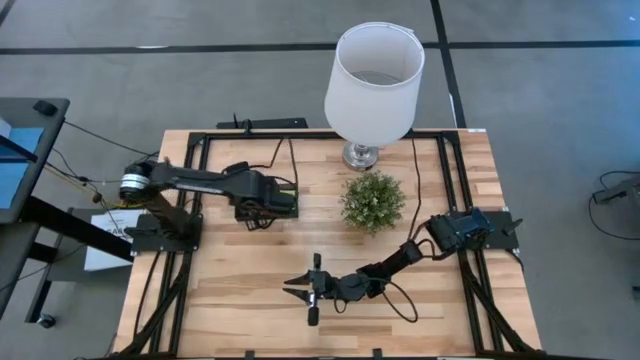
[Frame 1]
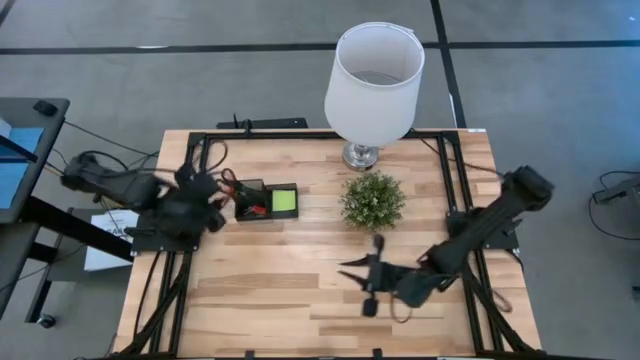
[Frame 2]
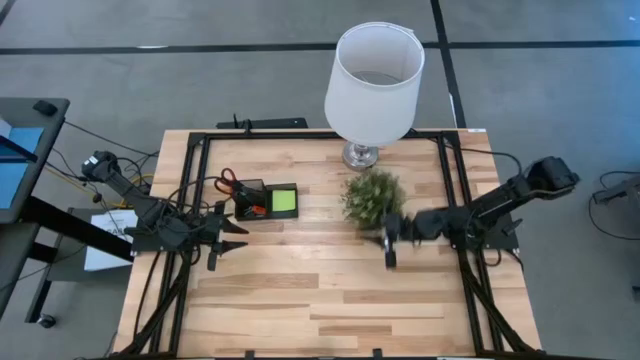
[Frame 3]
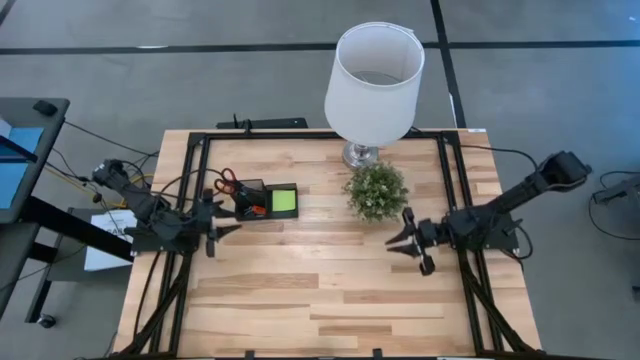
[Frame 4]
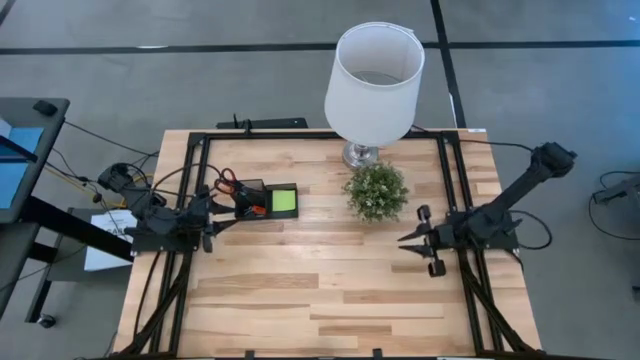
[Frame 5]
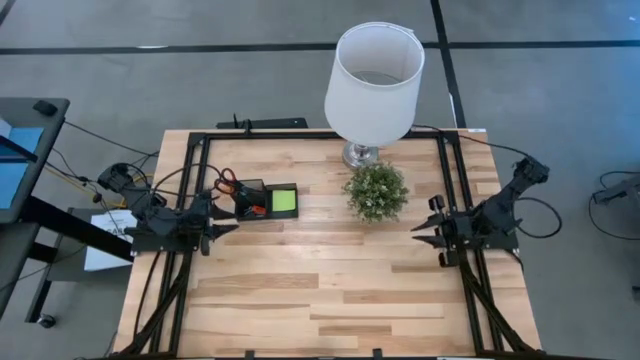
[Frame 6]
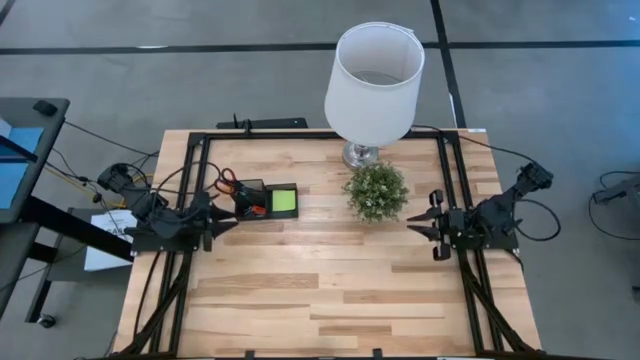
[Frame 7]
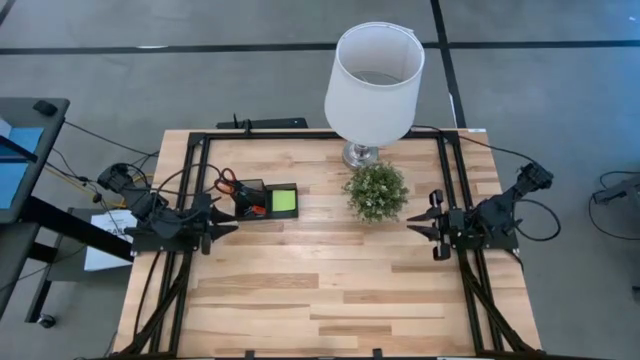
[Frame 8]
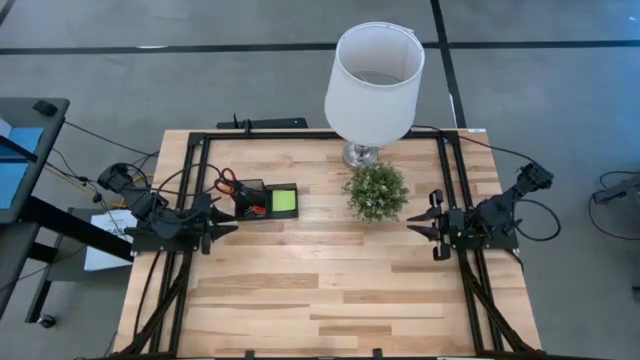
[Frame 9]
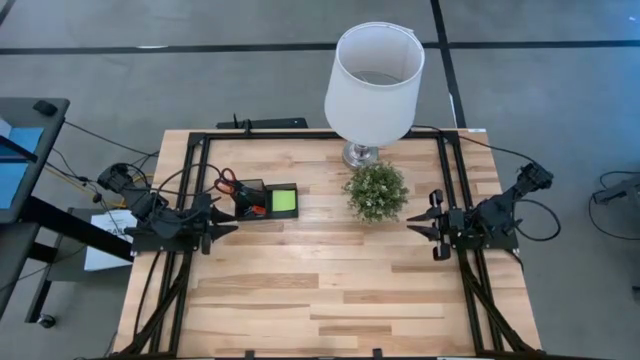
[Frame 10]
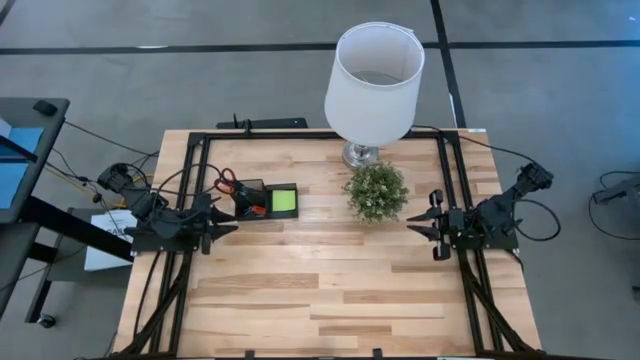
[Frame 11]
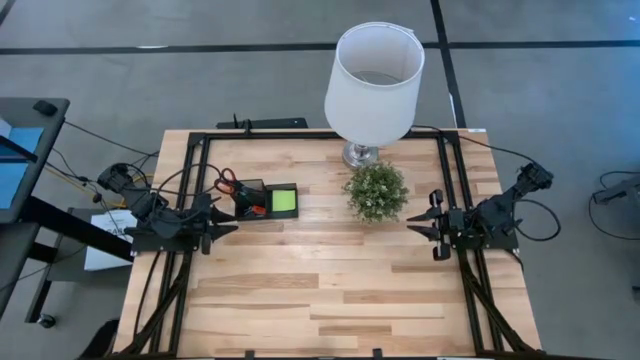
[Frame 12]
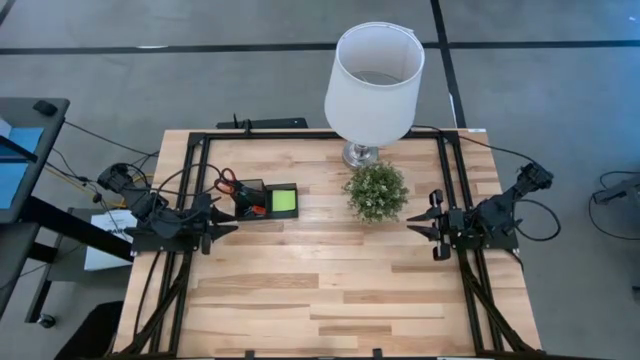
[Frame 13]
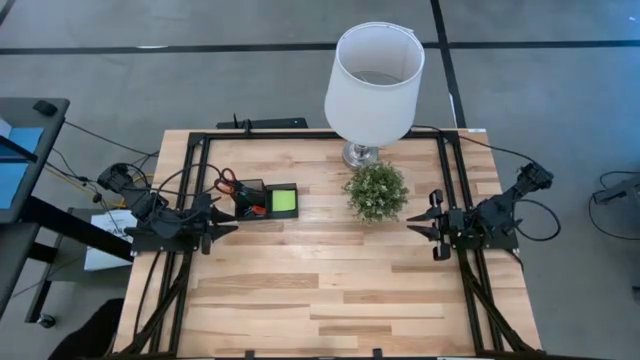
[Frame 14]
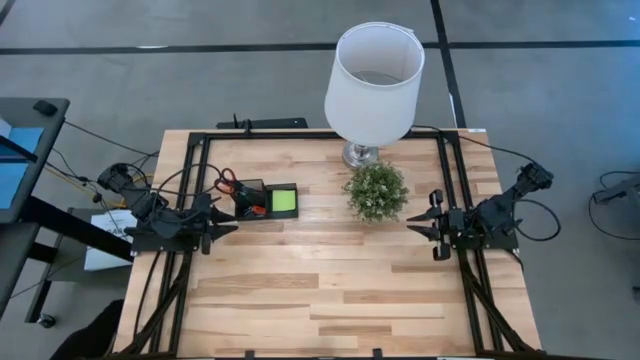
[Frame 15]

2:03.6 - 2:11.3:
Task: Pick and place office supplies into organizer
Return to Home Position

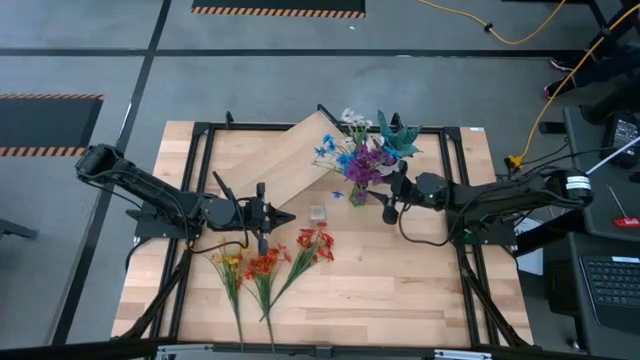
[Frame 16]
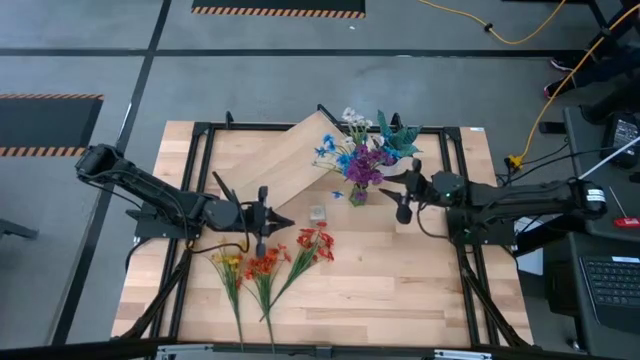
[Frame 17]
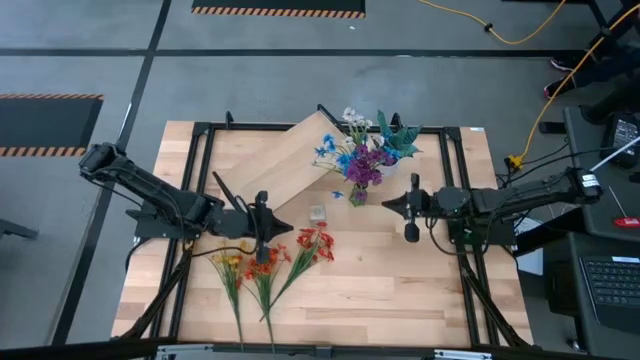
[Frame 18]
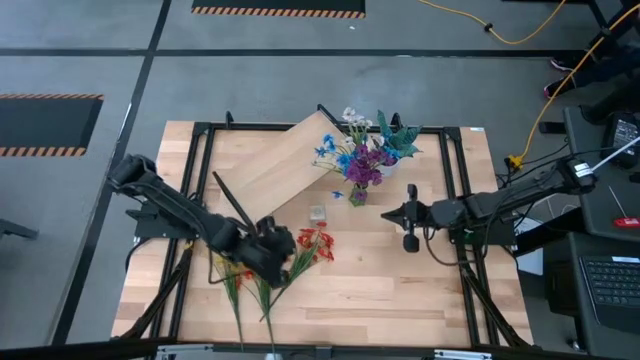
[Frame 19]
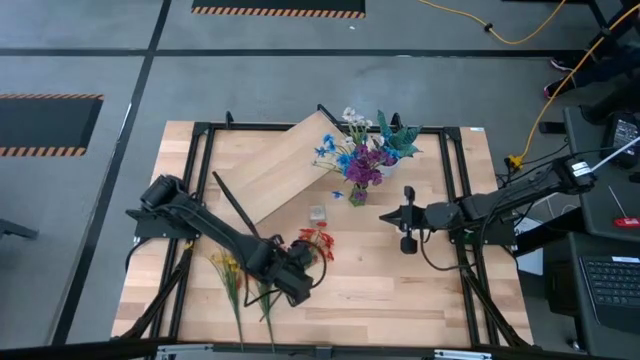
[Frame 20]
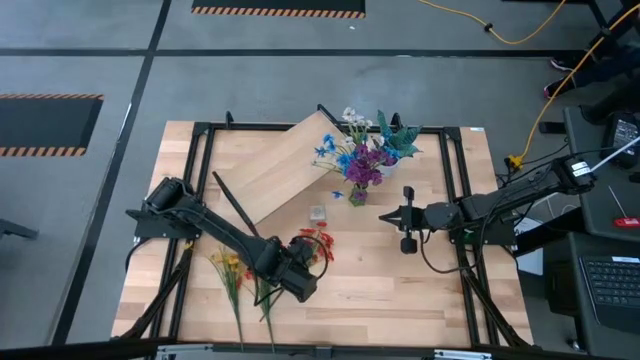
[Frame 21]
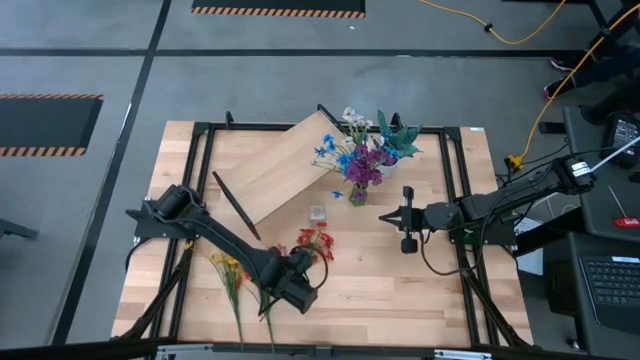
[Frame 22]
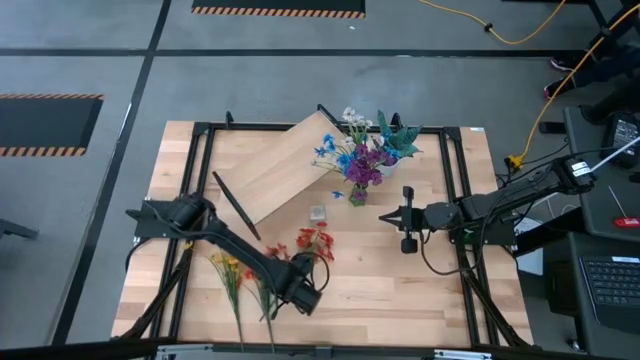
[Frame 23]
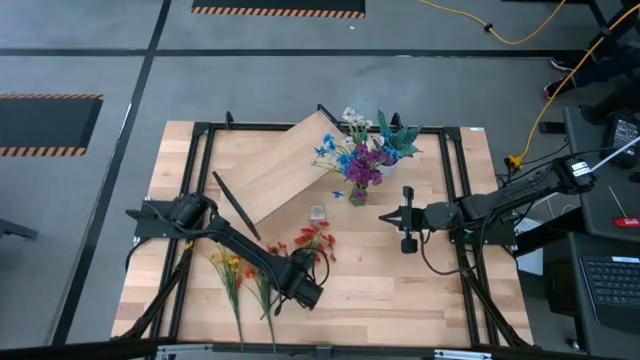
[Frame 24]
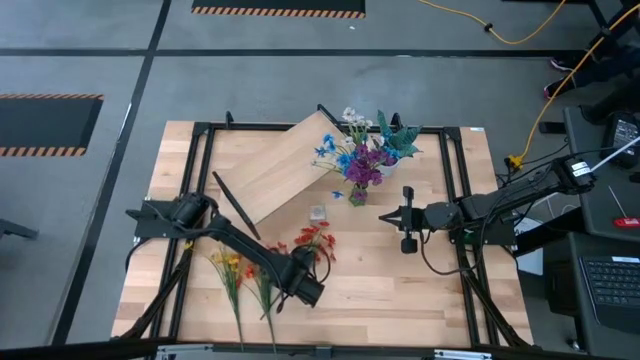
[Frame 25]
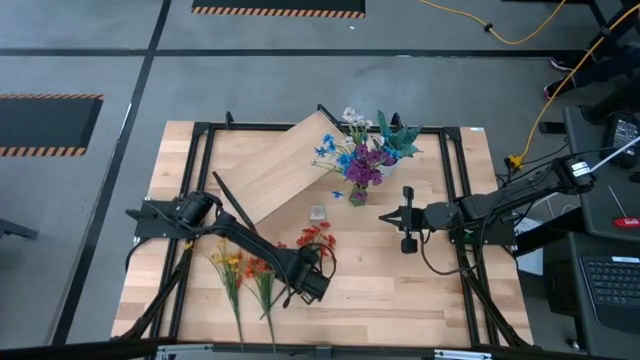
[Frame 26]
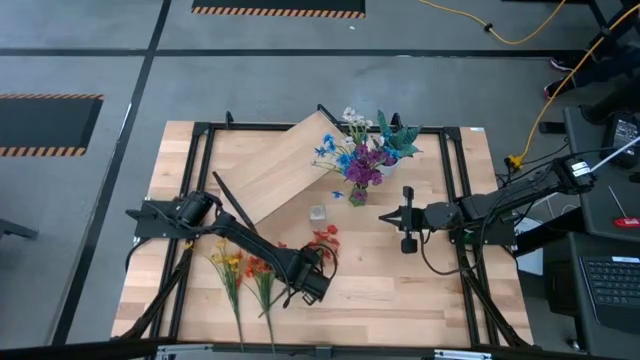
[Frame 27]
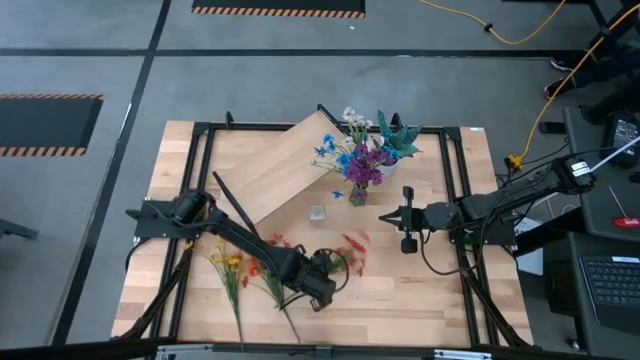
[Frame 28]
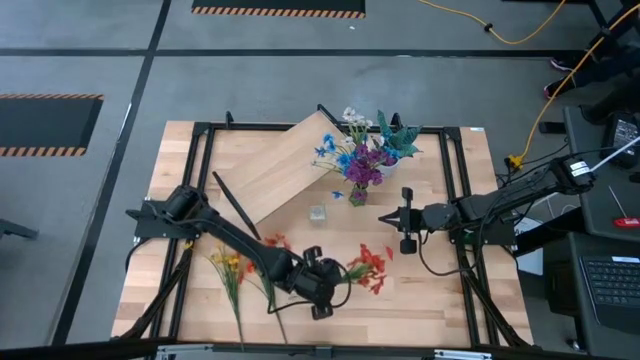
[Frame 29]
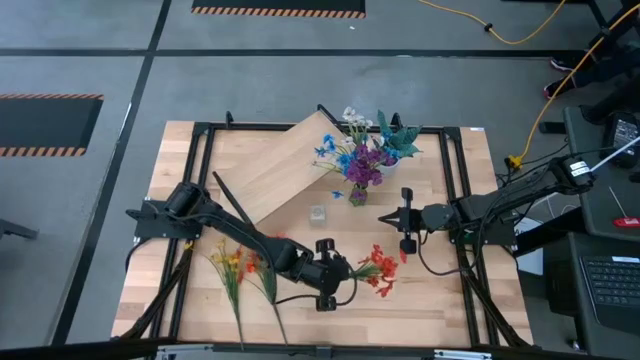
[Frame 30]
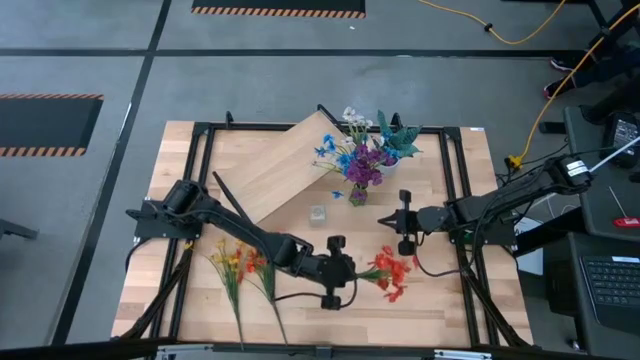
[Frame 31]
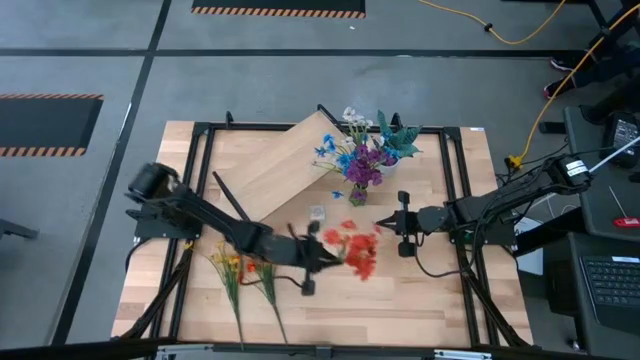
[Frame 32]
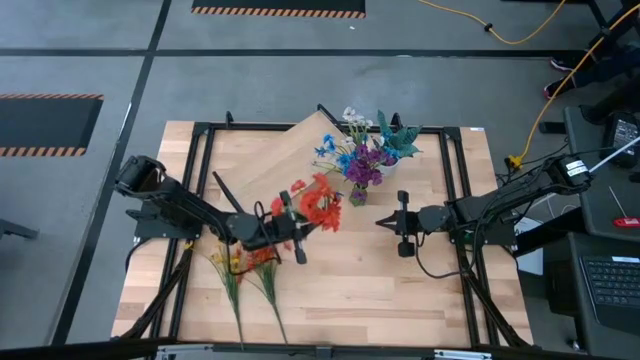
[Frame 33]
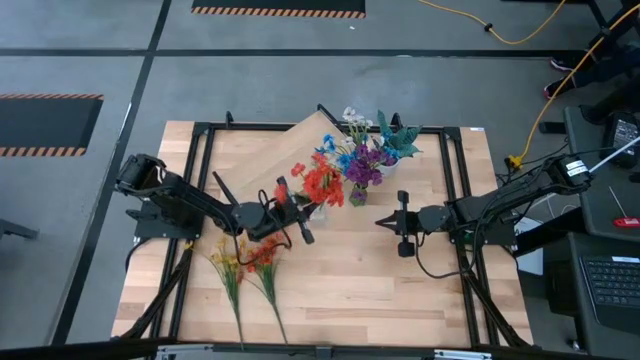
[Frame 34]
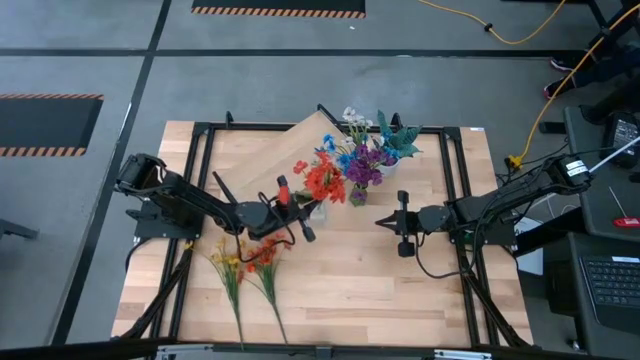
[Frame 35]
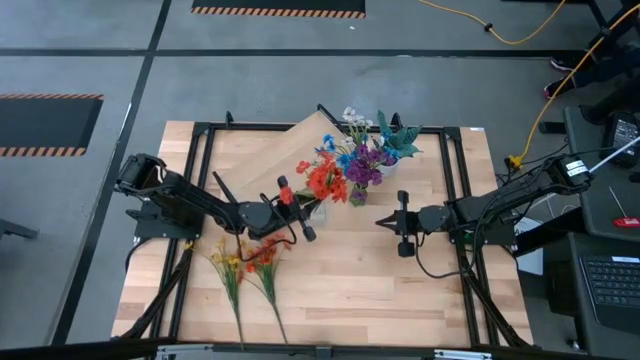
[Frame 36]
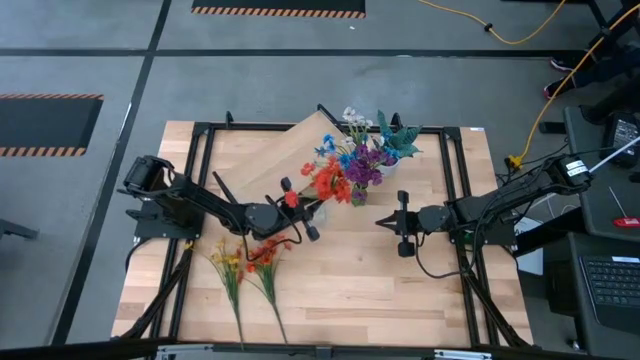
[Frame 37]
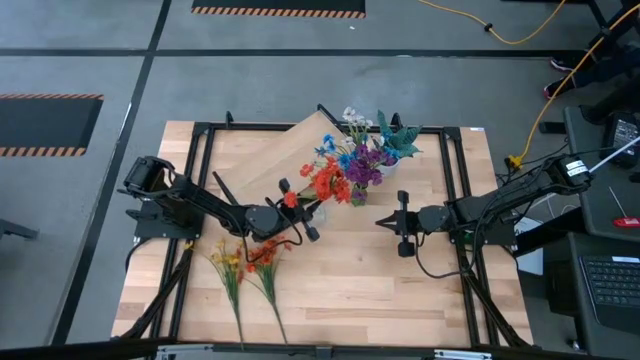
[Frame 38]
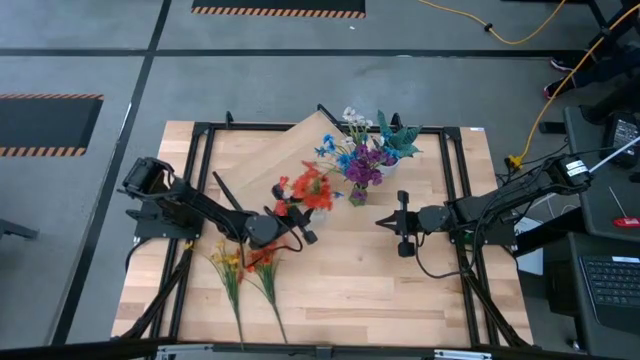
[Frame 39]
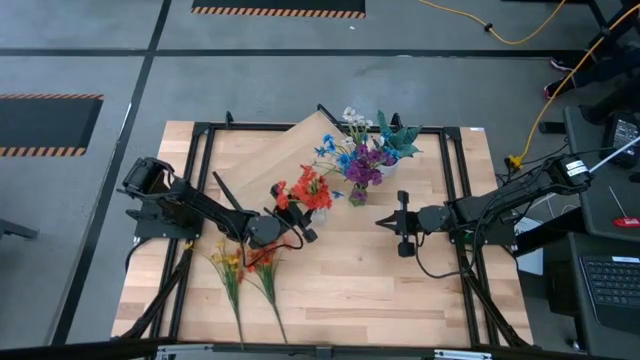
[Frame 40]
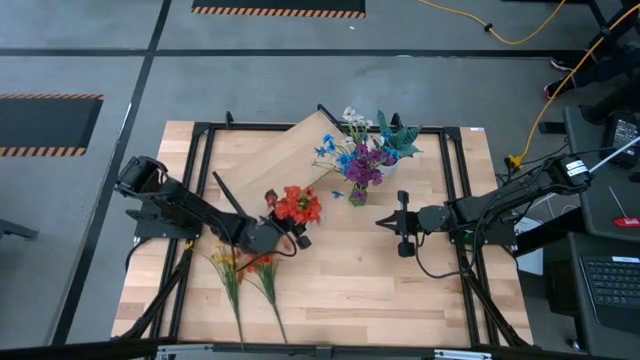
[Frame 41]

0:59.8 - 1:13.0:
Task: Pick and place flowers into a vace then onto a shelf
Put the right red flowers into the transparent vase

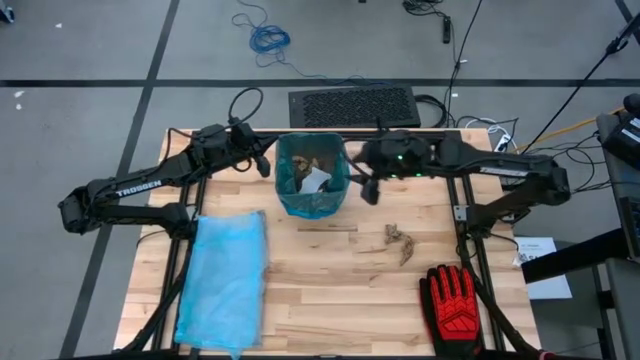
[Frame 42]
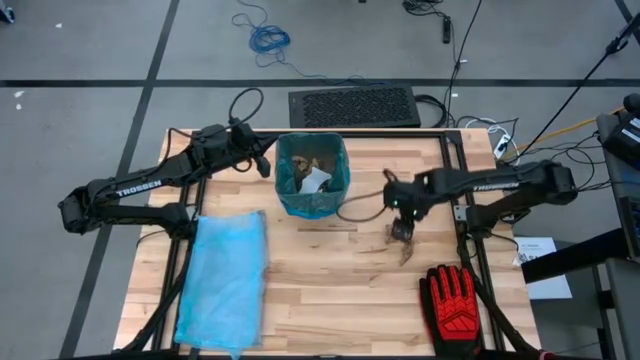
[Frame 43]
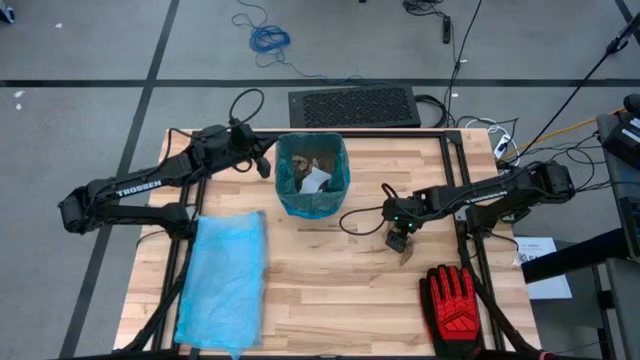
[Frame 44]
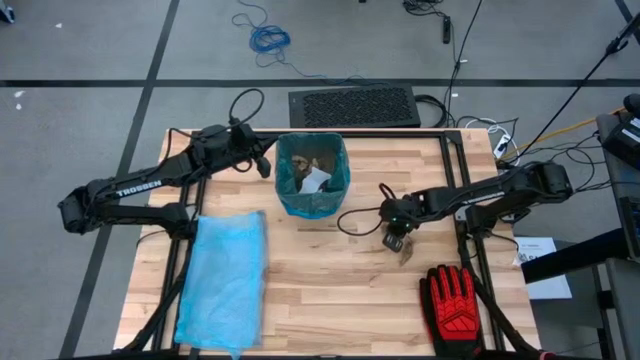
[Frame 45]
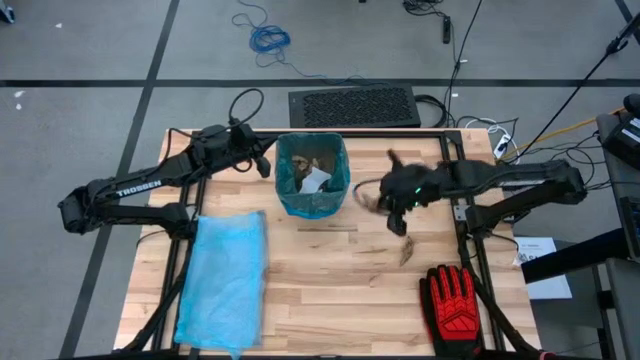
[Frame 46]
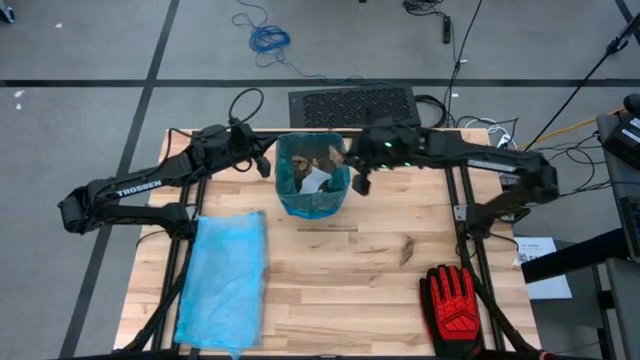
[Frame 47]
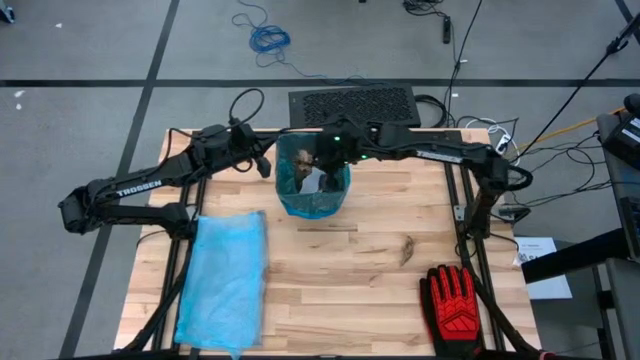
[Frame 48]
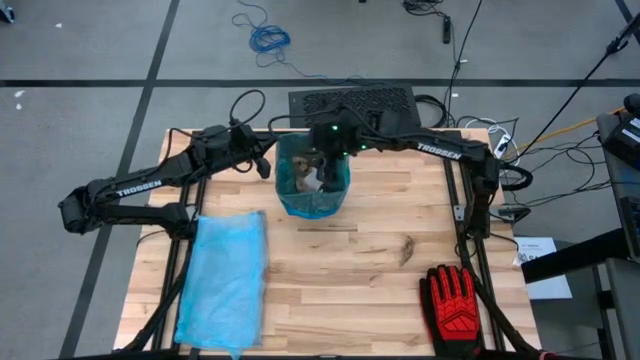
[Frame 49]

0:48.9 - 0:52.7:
Task: place trash/remove bag and relplace
Put the brown napkin into the black trash bin
